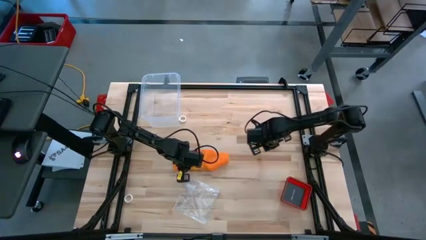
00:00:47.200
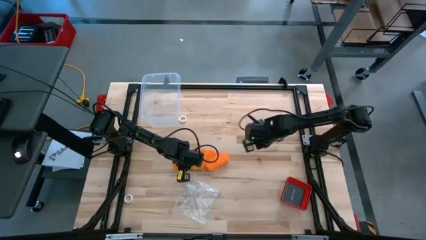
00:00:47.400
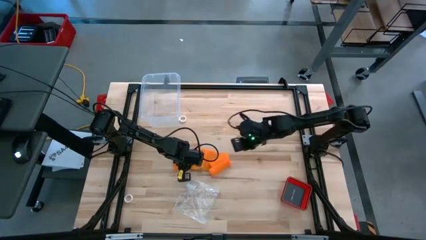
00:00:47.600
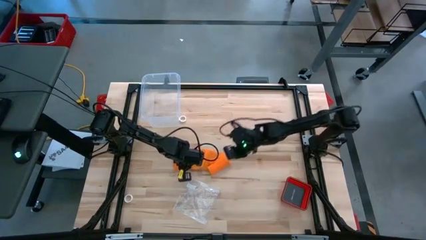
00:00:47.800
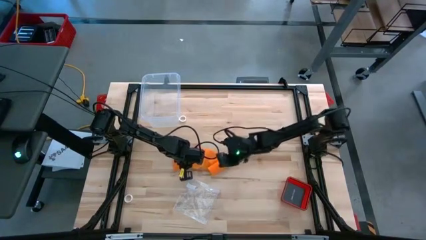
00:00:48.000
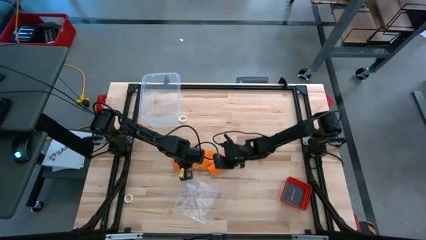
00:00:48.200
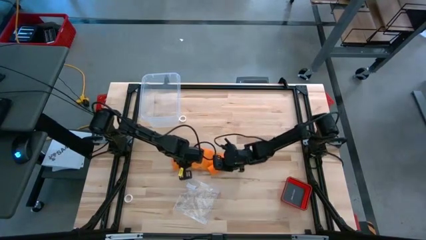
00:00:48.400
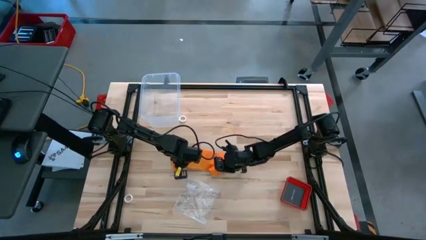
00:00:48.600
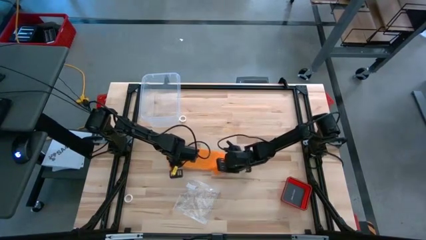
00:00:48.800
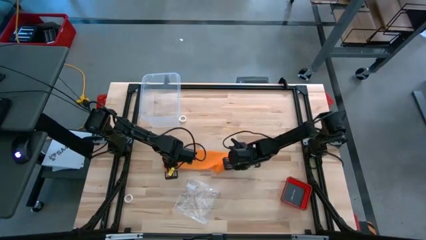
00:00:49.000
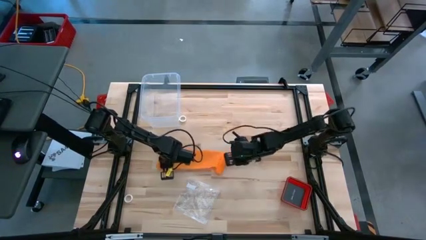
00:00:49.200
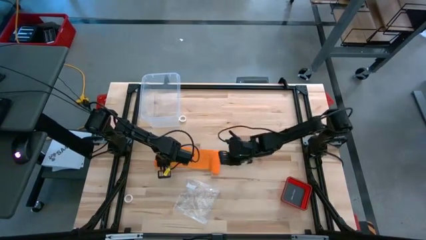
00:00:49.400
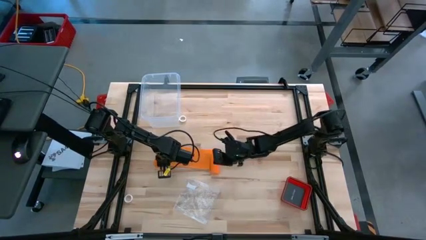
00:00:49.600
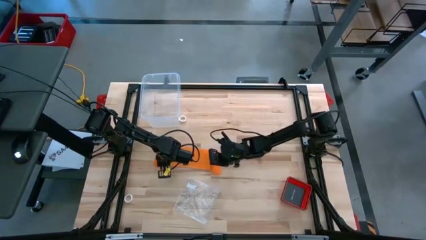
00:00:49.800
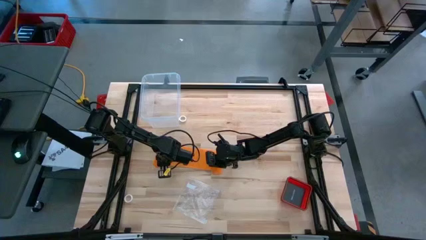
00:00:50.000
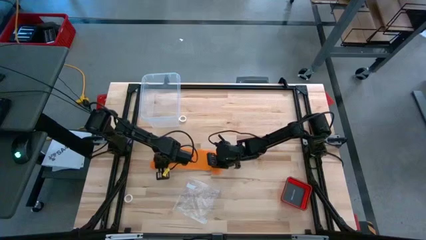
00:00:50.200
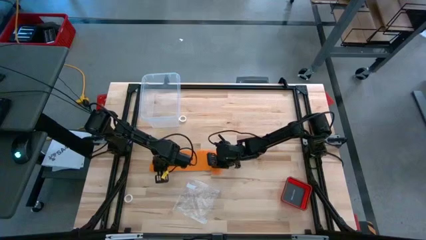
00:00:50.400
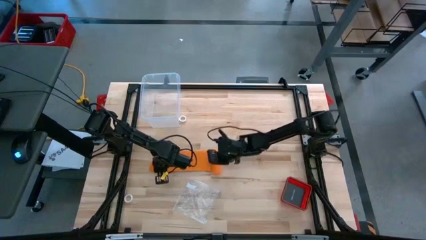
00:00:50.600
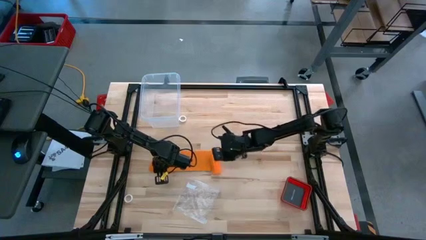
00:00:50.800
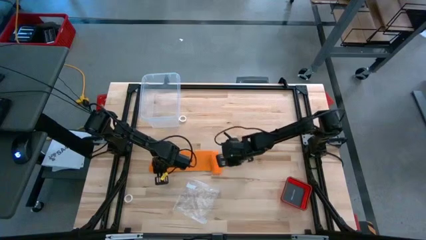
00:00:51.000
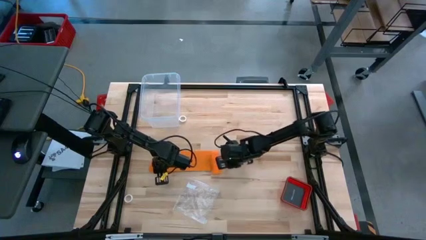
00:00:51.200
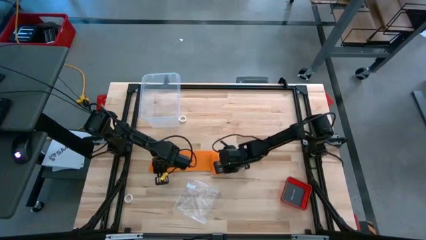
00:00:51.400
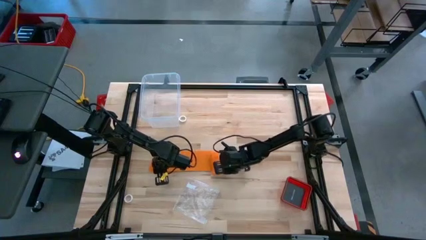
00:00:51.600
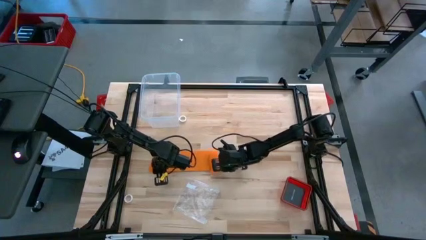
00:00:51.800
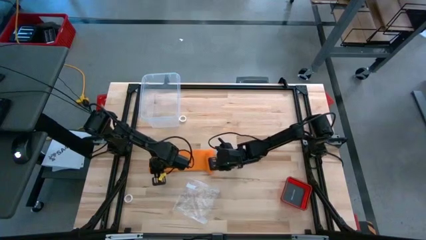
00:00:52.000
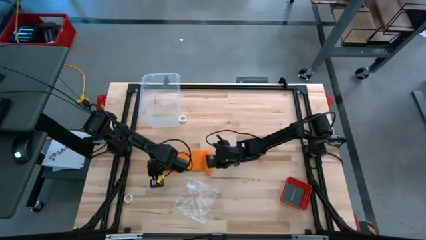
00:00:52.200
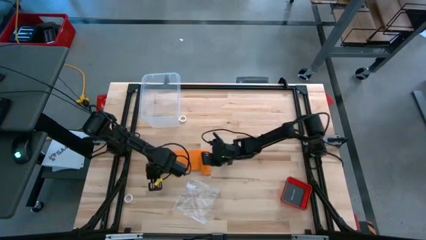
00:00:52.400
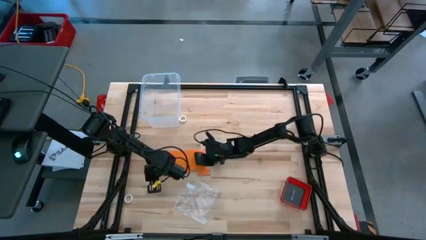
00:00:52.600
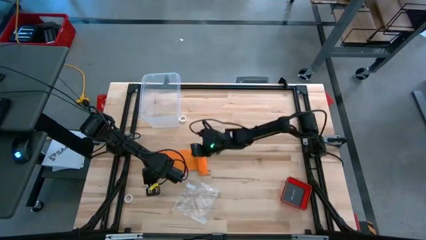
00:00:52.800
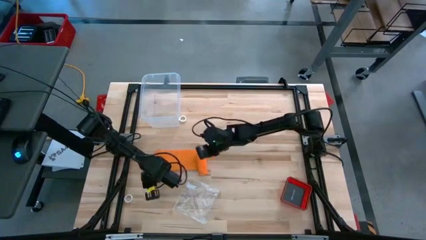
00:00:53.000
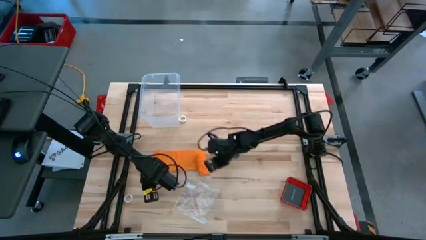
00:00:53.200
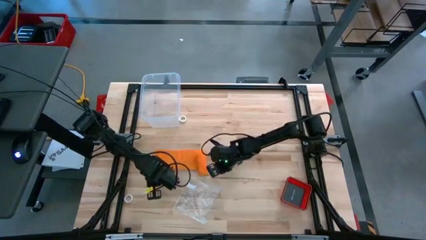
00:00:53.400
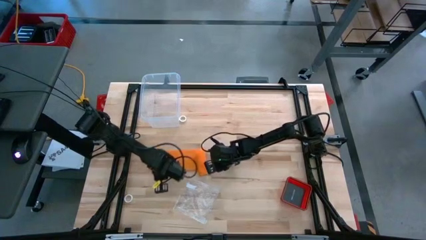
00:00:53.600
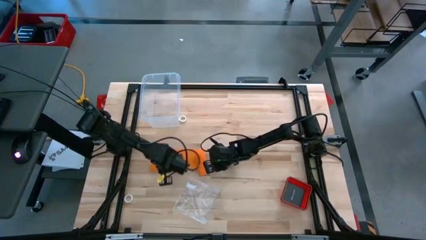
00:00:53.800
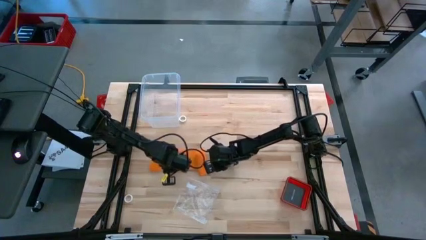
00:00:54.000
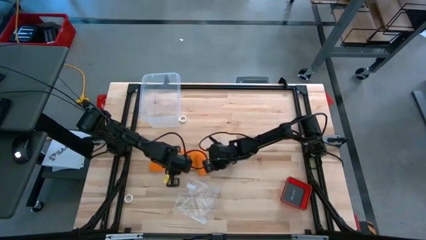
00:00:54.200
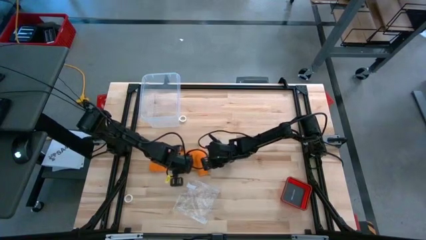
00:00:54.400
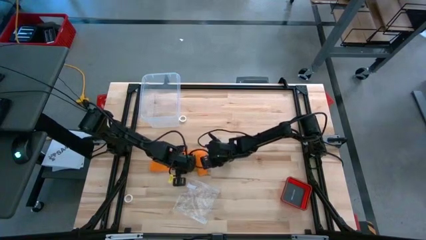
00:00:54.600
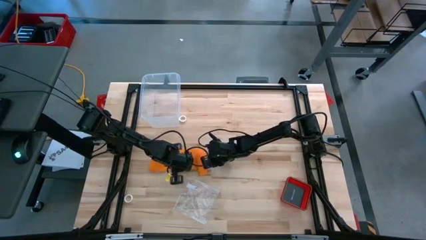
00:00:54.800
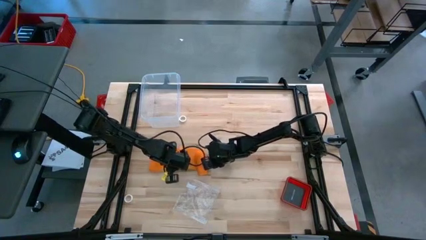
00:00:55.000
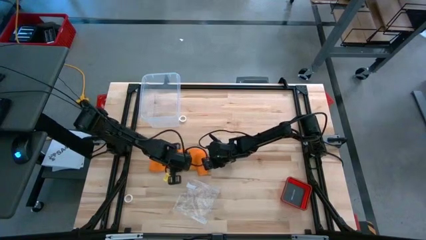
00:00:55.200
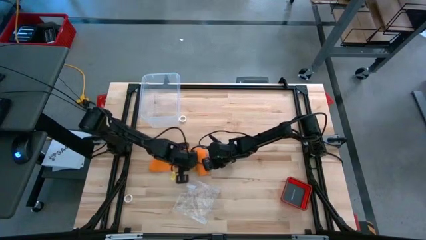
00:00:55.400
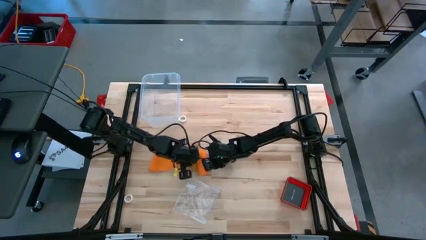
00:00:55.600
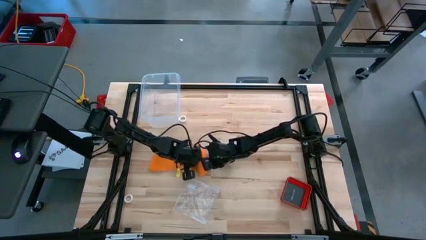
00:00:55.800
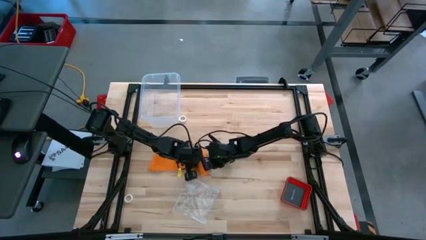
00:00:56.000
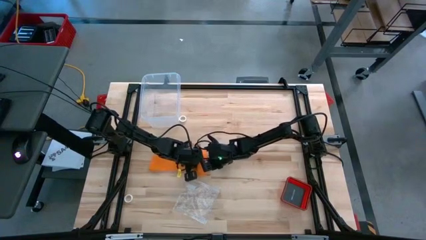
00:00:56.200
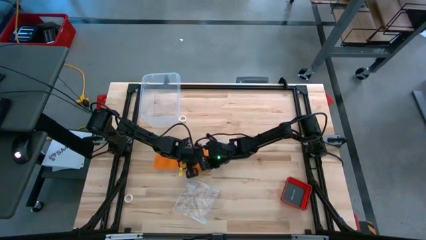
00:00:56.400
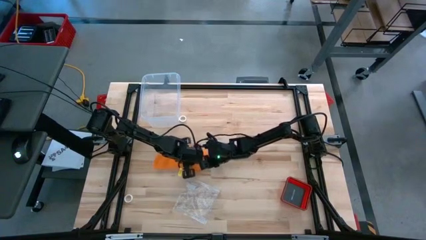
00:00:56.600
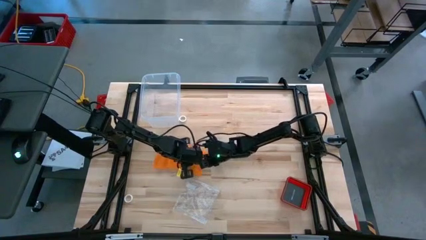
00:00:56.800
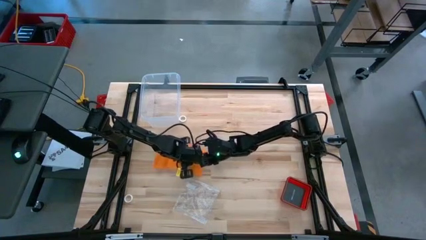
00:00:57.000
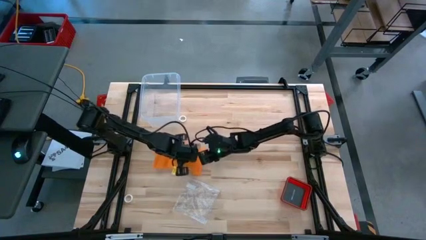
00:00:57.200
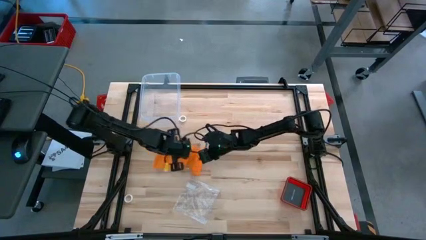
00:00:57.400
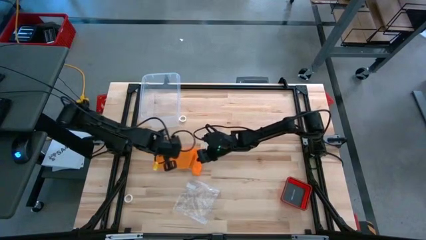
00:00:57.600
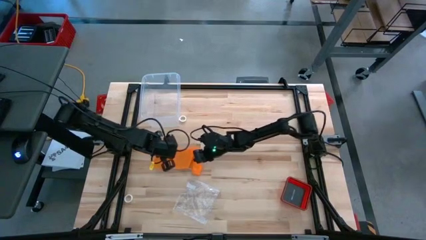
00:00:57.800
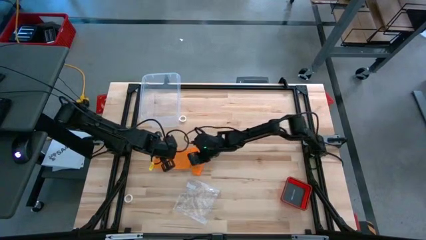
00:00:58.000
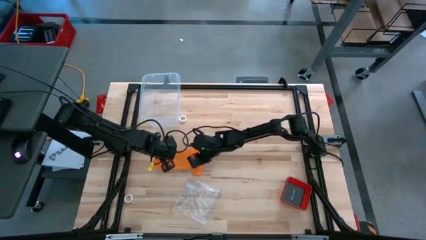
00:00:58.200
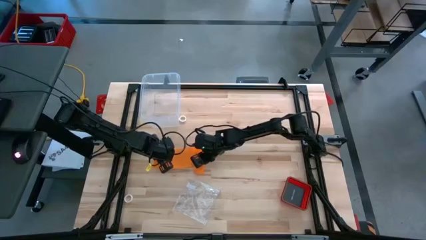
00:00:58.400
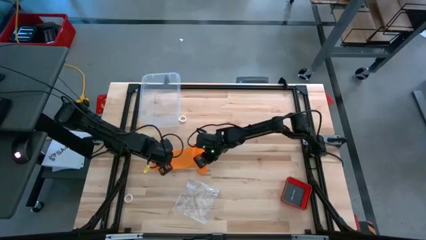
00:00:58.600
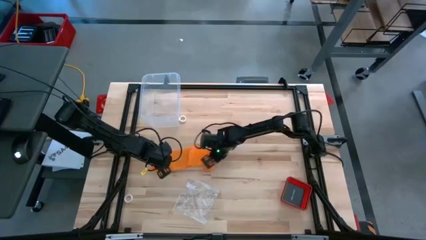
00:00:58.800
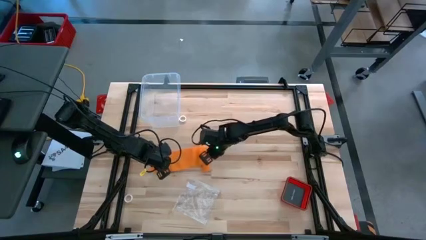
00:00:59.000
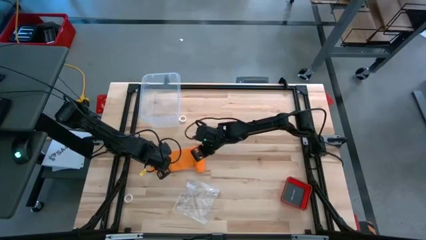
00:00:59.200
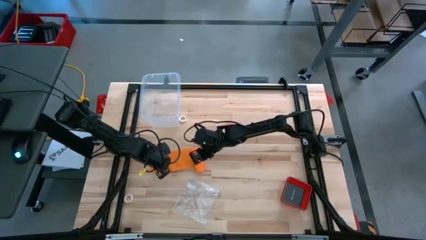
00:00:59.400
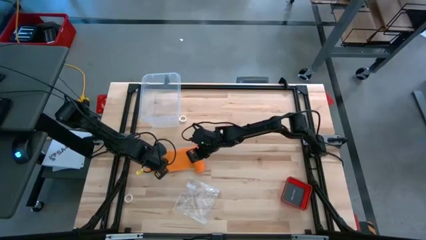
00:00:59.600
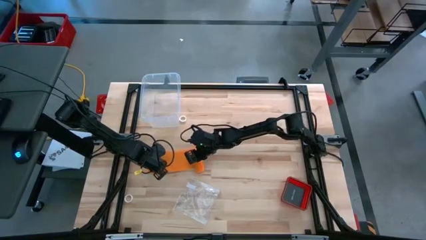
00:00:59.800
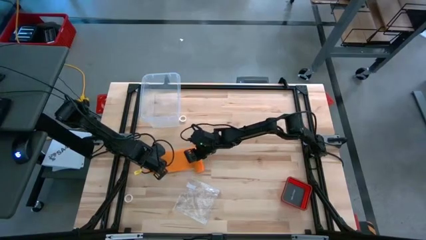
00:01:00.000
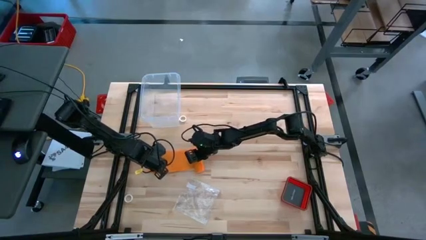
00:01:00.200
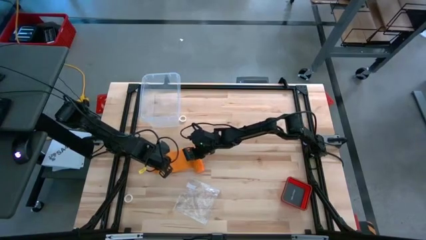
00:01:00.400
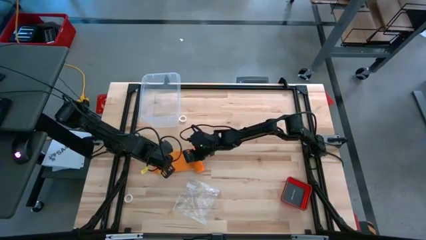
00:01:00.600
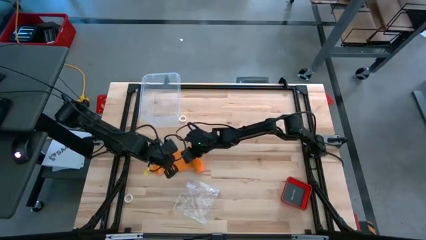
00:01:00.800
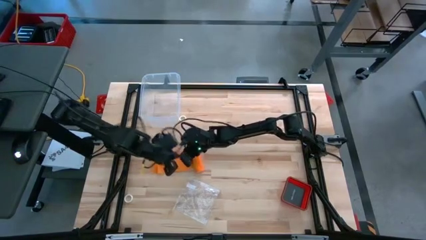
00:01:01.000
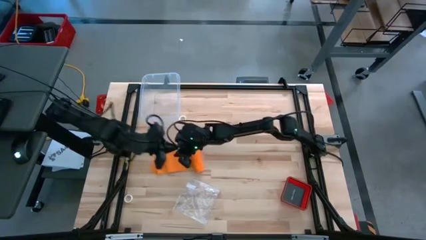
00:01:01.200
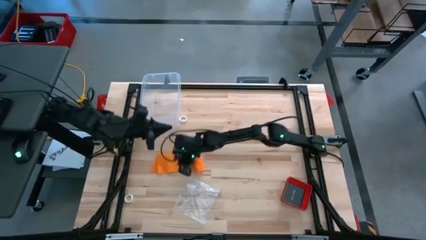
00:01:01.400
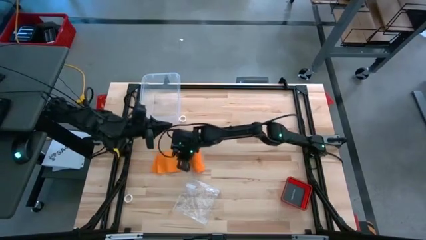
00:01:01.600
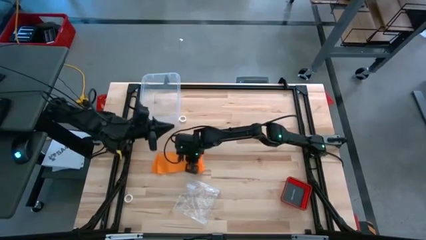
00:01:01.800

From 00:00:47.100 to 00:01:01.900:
Task: Roll bandage
Roll the orange bandage

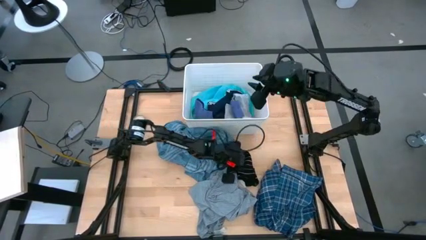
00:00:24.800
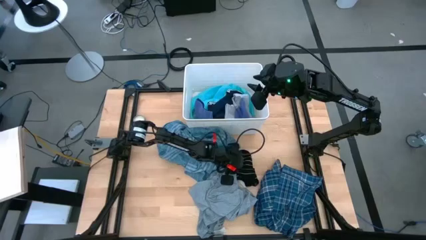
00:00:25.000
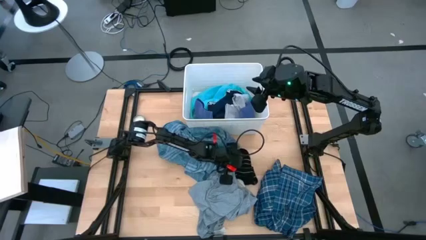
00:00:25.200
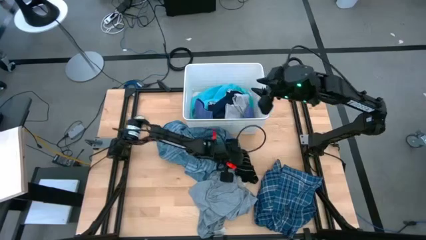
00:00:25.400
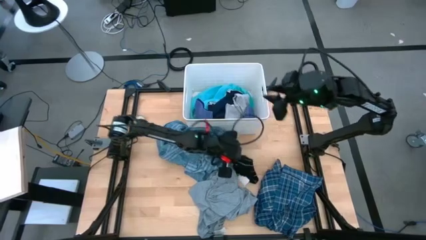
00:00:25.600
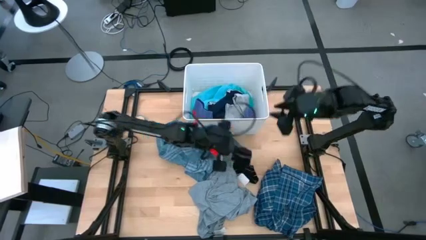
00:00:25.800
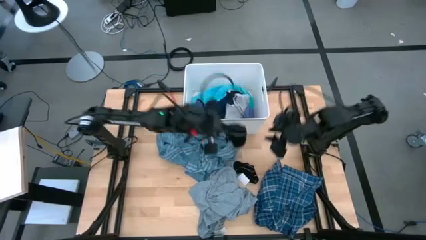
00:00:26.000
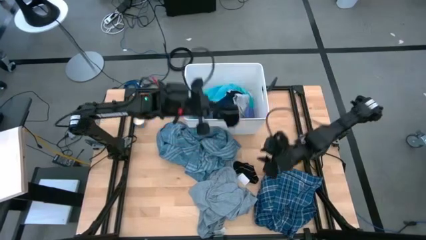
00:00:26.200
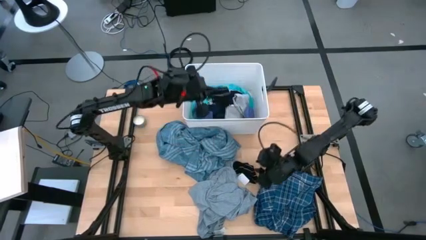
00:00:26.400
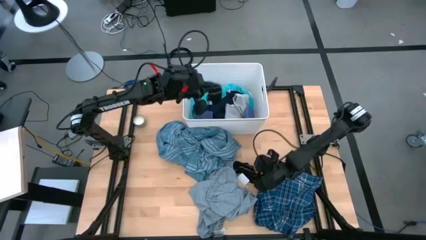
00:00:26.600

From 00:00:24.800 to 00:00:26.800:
Task: Sort clothes
Put the black sock into the white laundry organizer

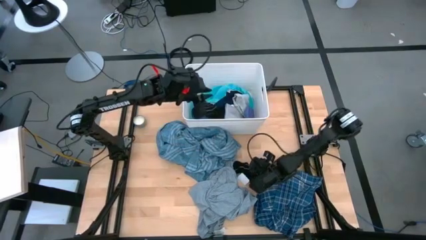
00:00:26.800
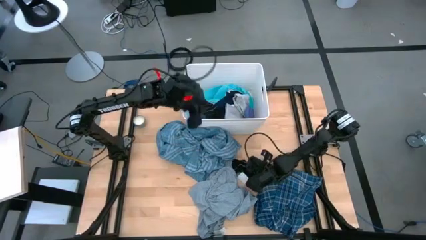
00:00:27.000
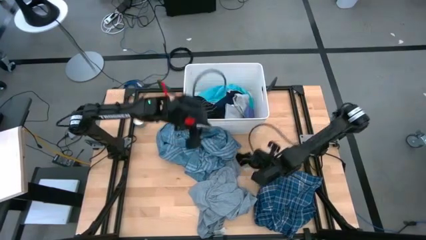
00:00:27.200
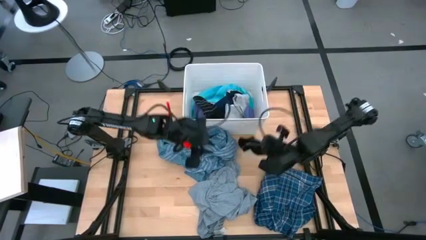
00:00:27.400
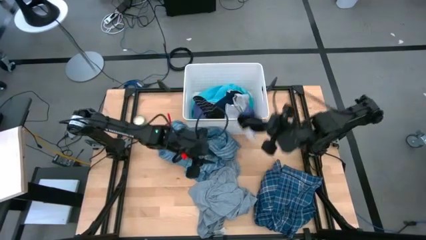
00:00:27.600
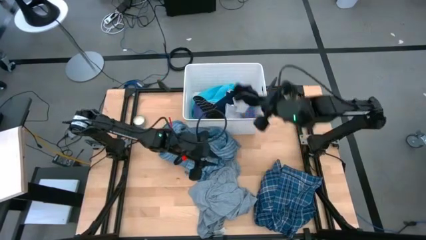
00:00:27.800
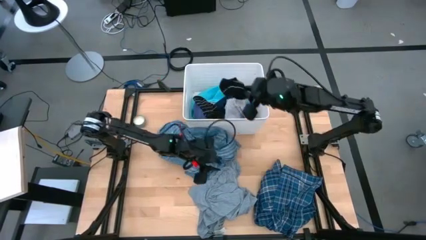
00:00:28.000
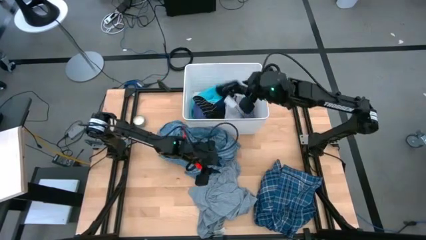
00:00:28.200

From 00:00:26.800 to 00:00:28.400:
Put the black sock into the white laundry organizer
